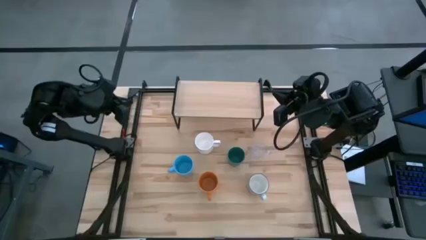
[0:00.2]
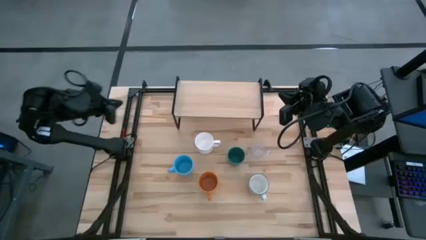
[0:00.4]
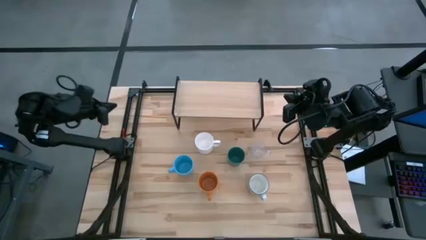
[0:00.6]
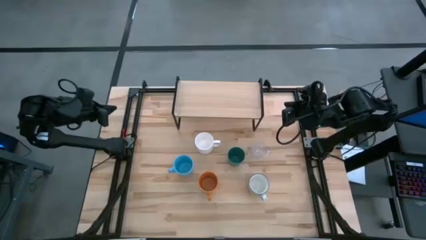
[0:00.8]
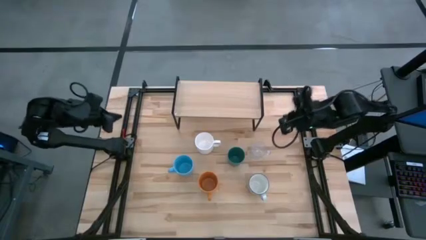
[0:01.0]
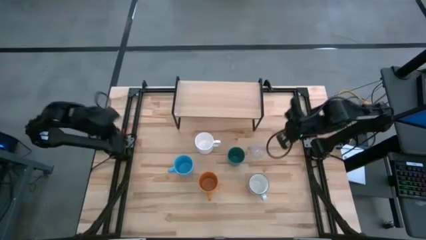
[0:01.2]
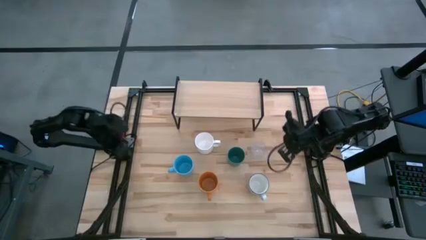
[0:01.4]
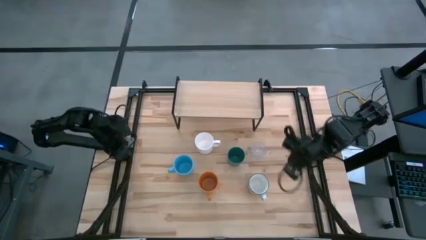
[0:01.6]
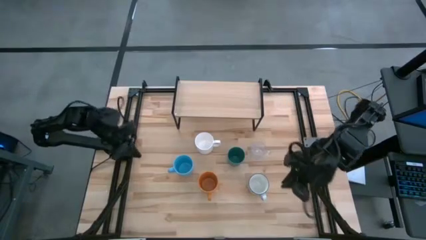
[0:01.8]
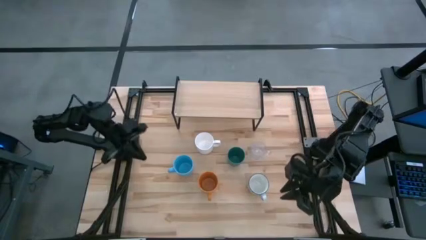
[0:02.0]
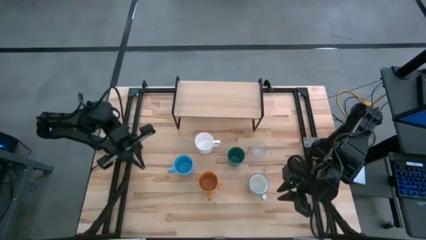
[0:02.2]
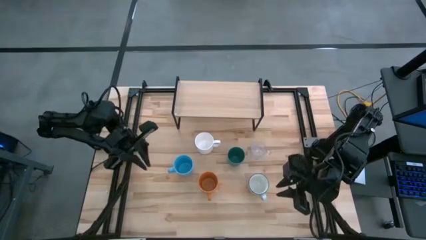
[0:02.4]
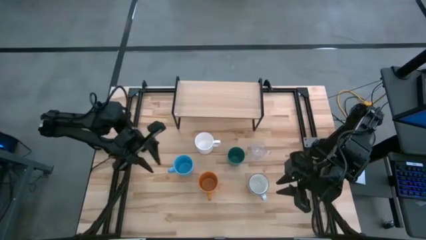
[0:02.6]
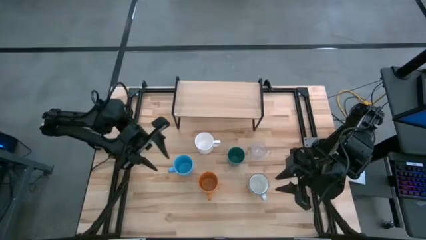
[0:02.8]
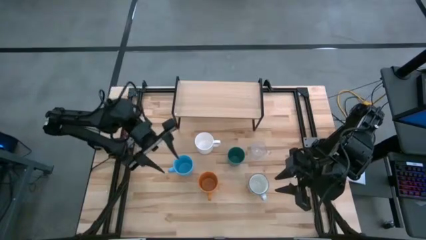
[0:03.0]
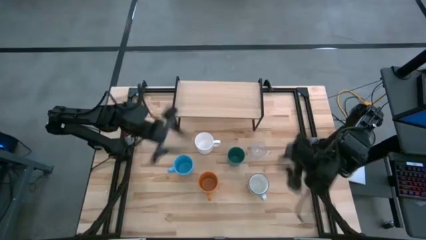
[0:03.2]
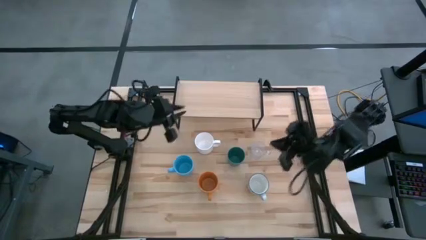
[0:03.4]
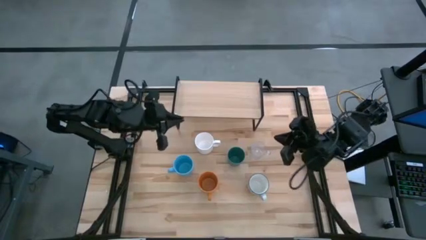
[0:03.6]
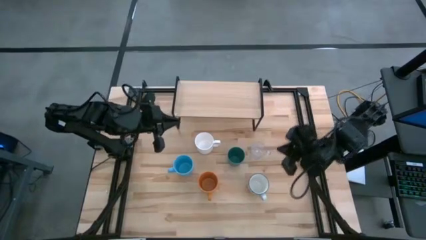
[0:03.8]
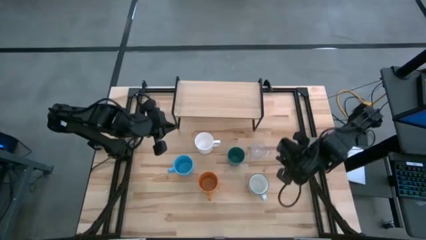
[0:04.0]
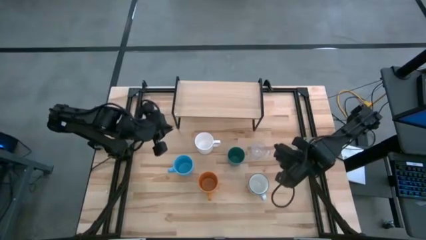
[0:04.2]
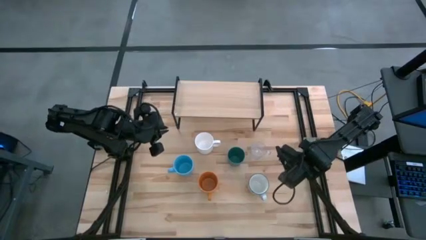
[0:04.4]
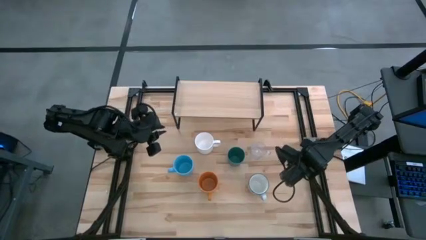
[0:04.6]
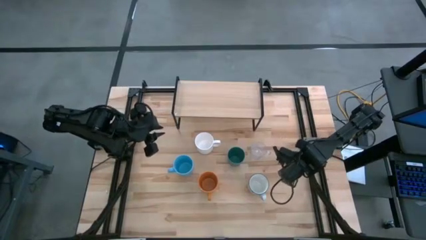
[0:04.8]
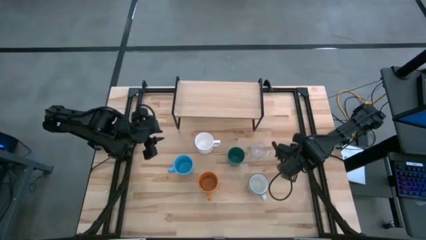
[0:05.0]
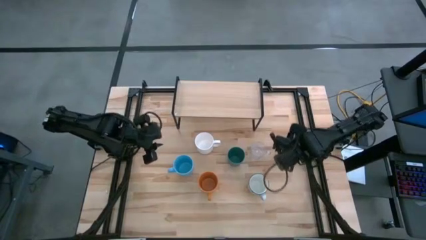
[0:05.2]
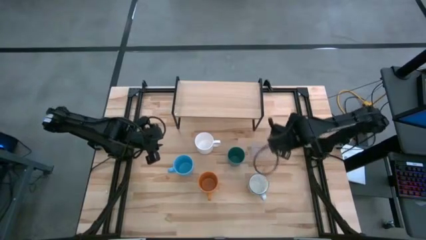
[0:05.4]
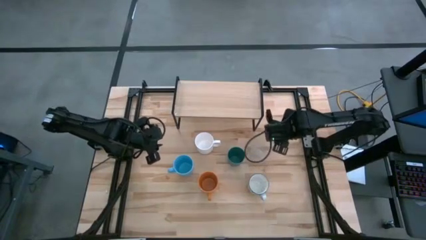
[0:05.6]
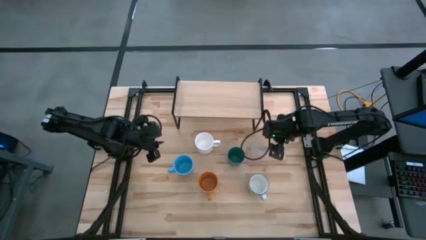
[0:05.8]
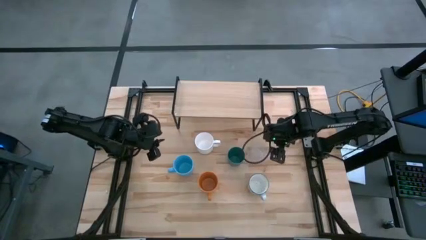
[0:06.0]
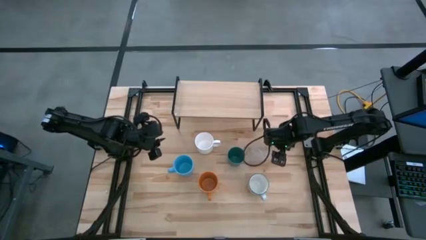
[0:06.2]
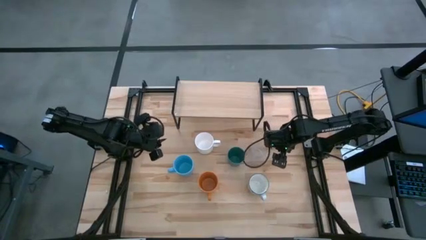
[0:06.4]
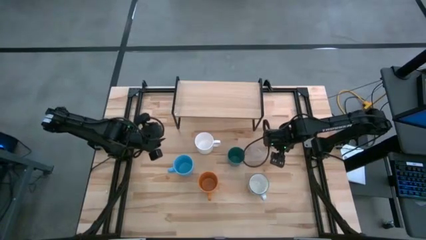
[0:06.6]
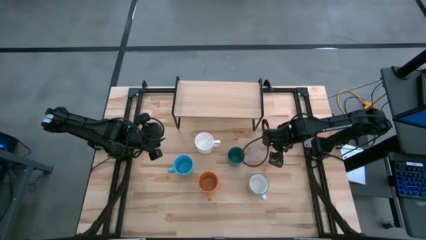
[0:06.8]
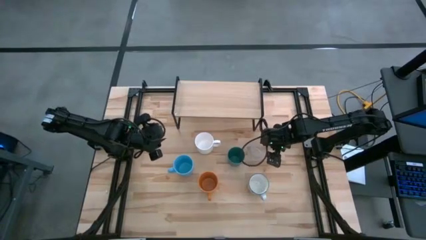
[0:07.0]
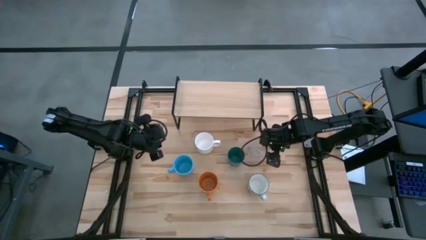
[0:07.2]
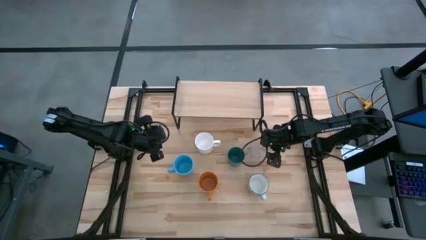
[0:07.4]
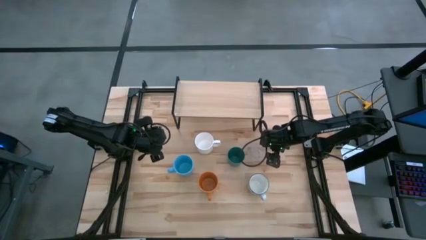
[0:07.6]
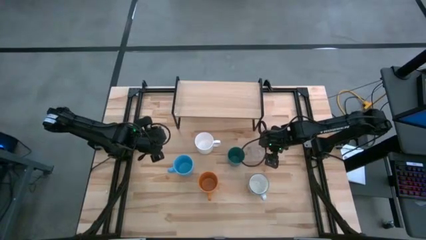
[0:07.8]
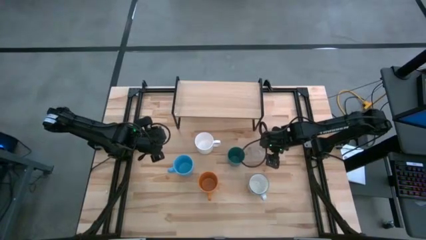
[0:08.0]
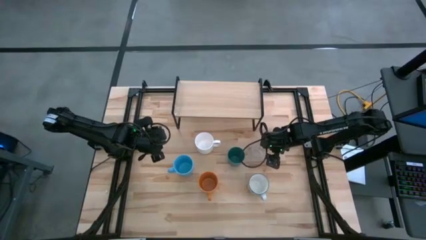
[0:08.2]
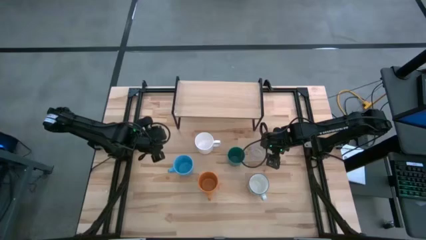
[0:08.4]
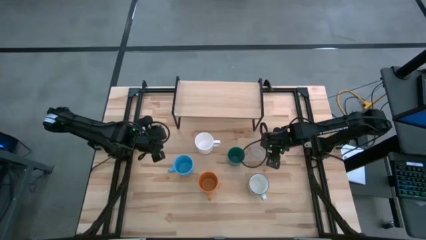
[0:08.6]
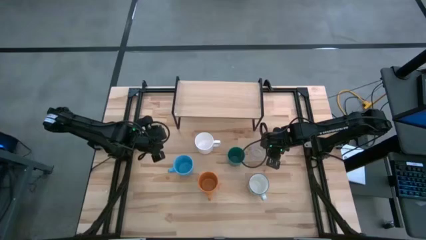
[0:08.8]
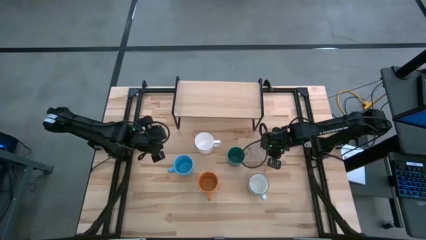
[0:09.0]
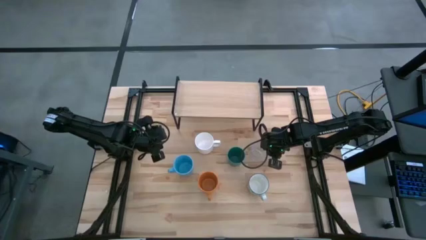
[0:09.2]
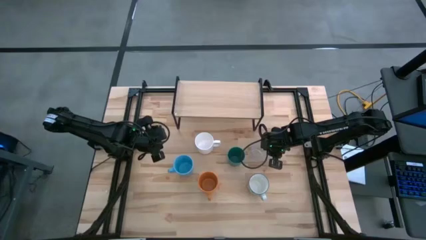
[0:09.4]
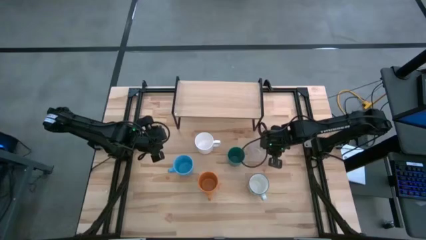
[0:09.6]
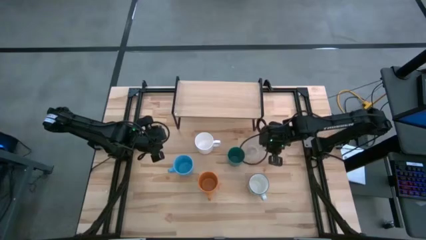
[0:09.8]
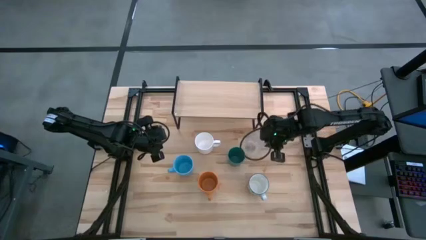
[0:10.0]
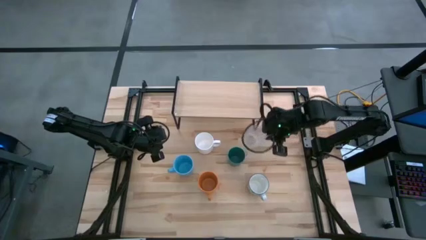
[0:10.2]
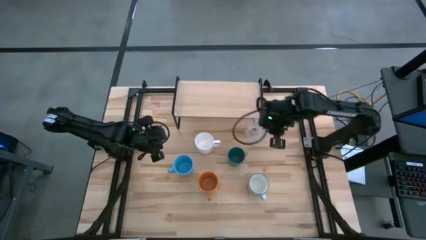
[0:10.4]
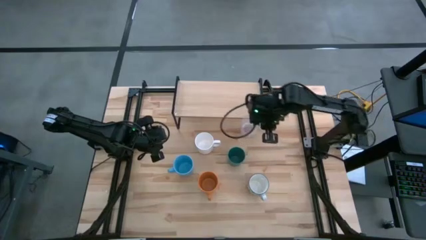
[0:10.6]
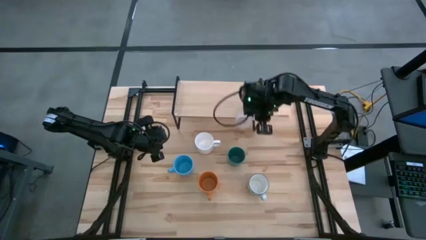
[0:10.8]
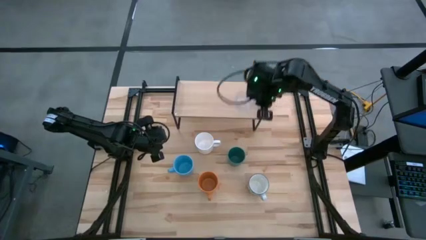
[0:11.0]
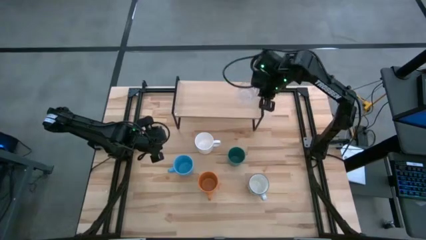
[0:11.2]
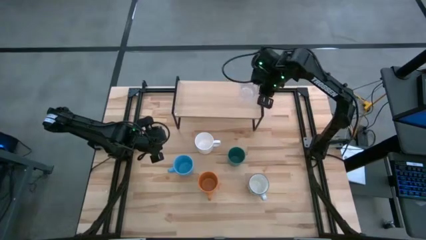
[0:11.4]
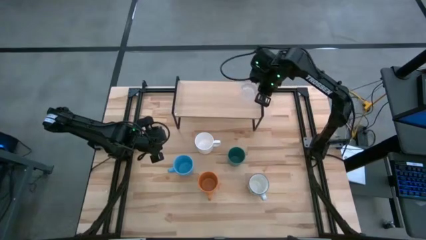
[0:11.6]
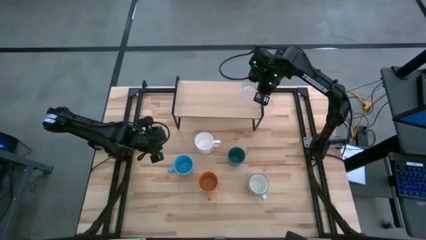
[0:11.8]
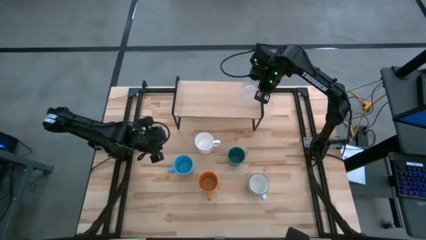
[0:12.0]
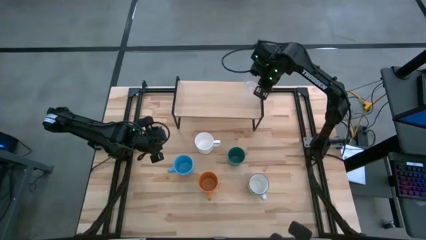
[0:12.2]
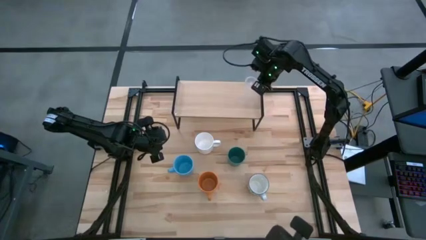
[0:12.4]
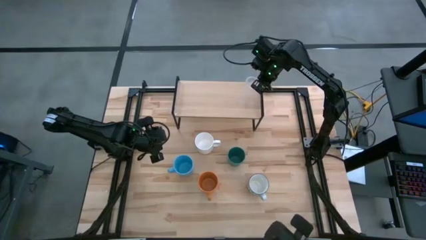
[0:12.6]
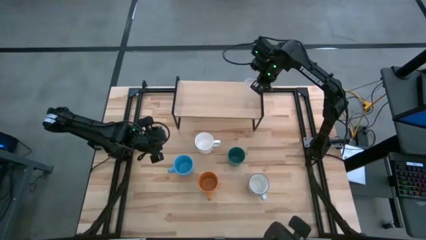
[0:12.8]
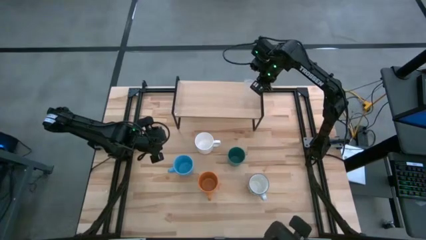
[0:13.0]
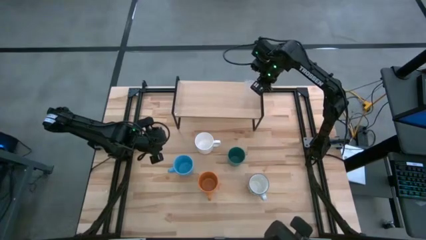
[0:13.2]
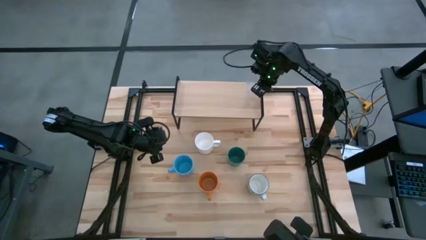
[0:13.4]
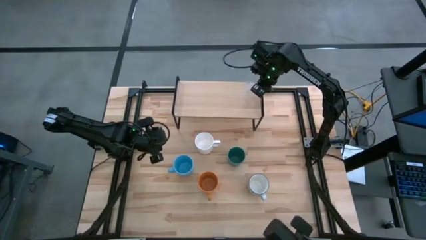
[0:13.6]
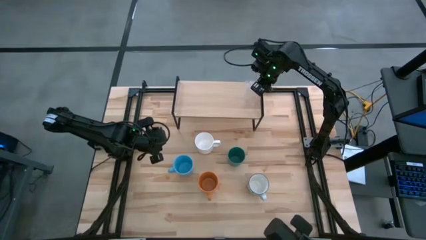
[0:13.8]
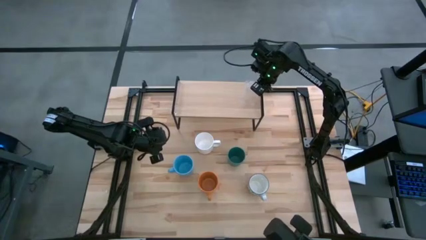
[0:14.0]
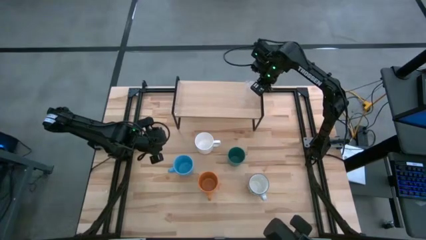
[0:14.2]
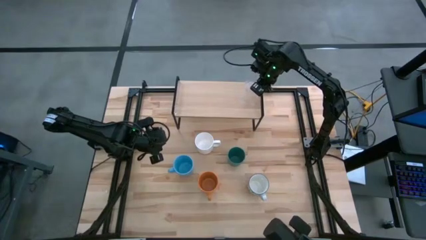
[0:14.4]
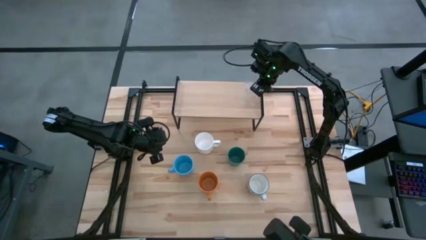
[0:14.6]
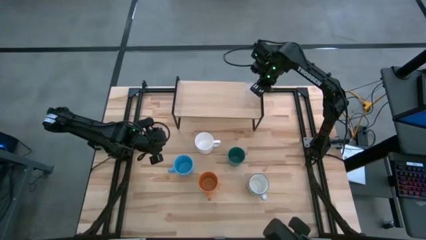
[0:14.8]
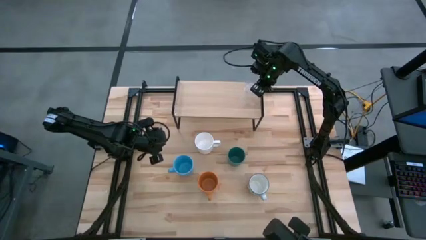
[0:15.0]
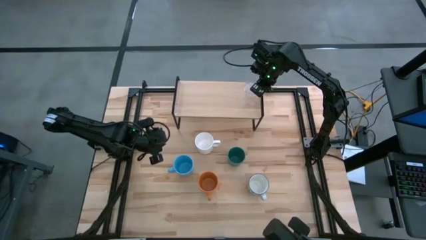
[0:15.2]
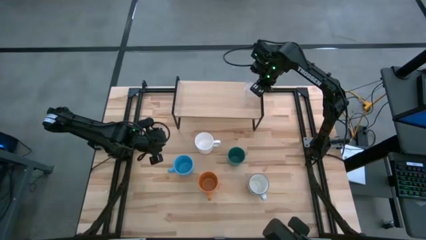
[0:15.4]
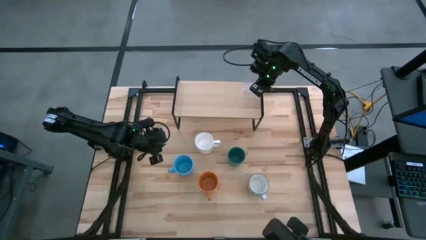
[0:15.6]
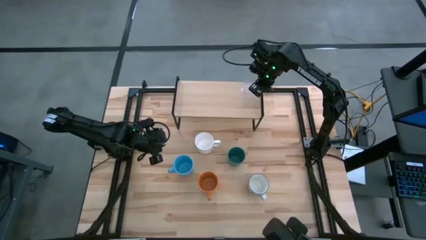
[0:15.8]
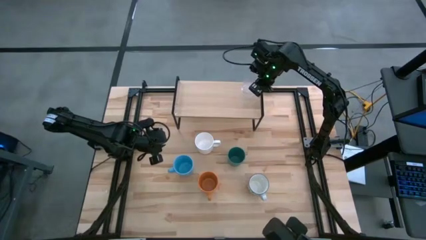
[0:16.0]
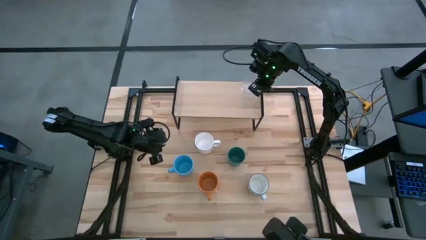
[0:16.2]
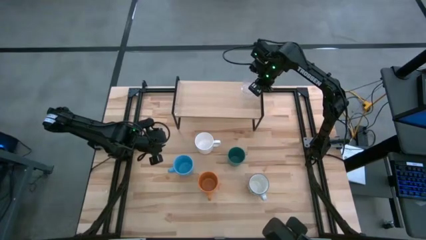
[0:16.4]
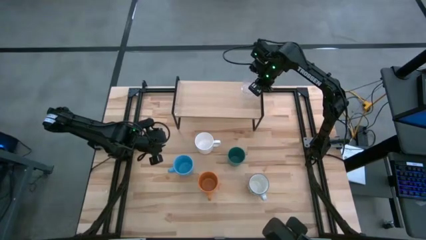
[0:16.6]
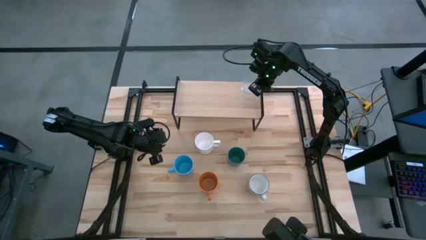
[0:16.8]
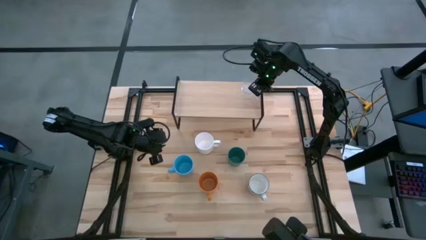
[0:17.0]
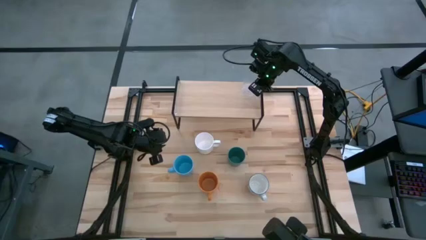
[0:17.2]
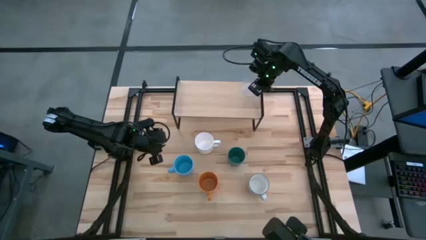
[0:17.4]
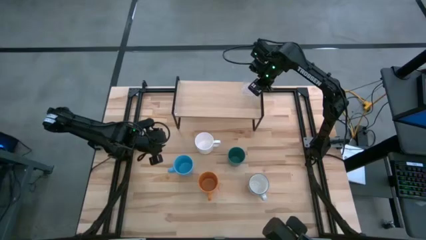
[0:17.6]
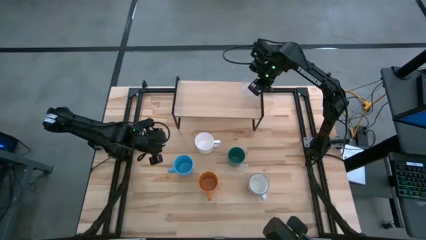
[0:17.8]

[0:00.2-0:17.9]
Task: Stack small to large cups/mugs on shelf
Put the transparent cup on the shelf
